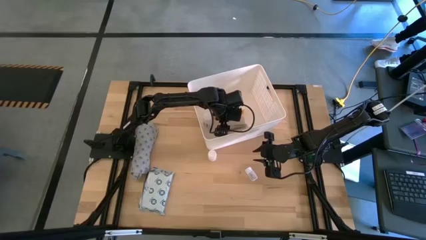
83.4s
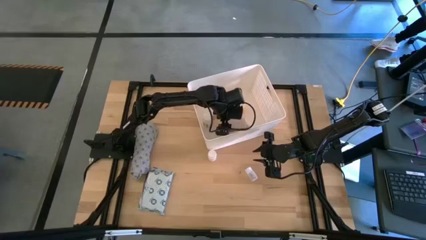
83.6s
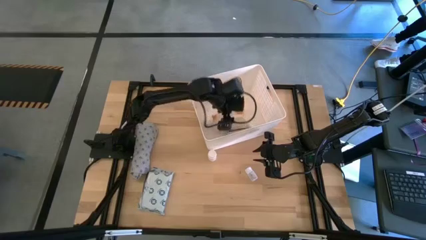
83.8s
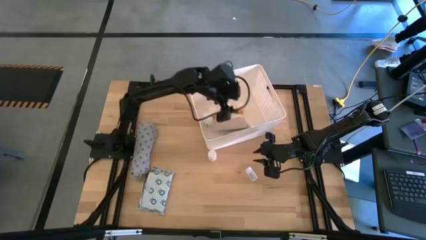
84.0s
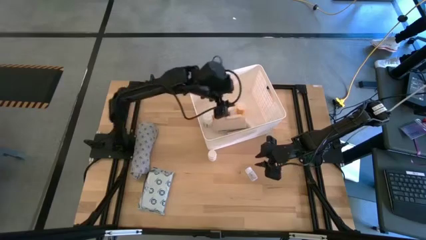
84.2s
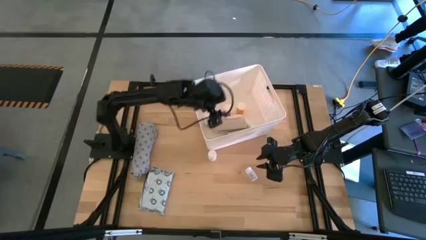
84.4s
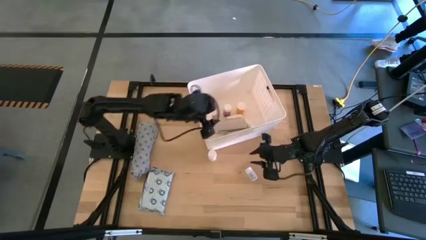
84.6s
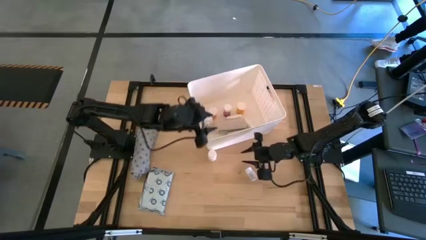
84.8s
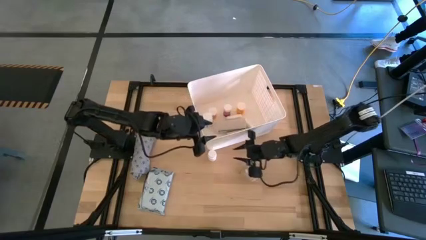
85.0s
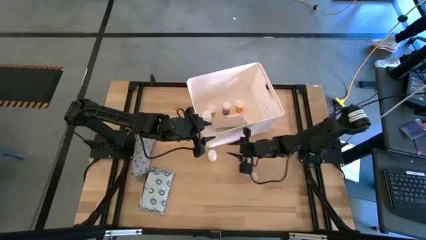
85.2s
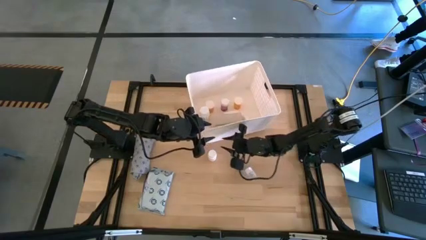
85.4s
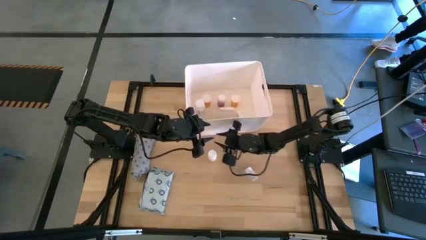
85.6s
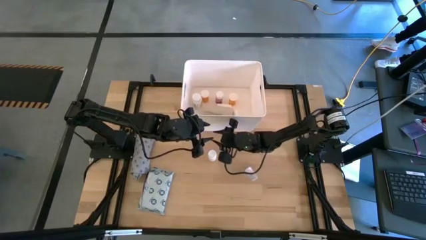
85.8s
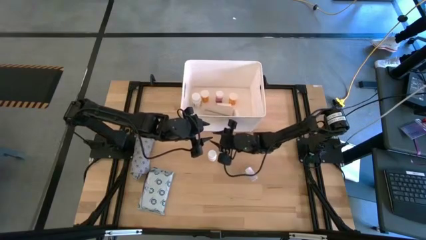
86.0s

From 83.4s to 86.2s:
Task: Pick & place medical supplies in basket/bin
Adjust the white bin on the table

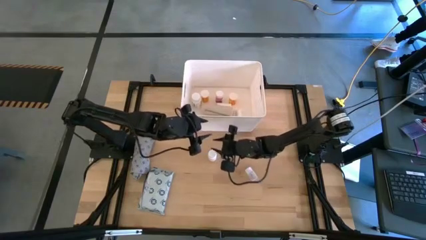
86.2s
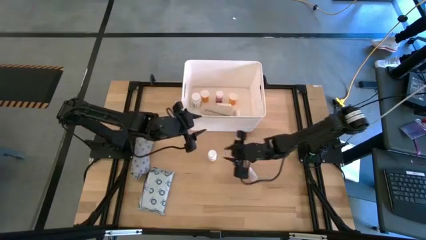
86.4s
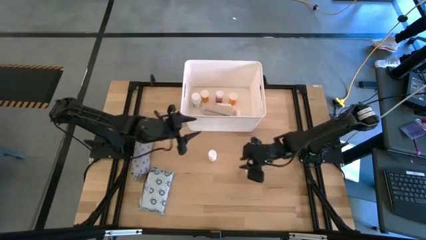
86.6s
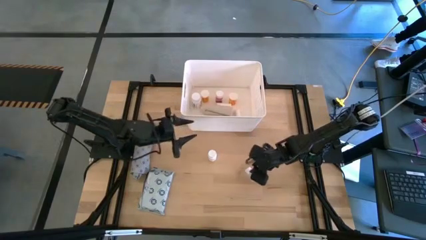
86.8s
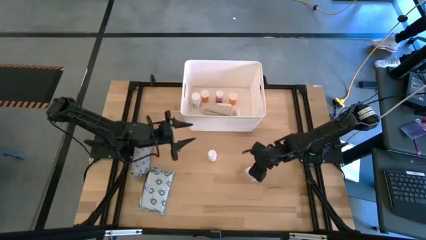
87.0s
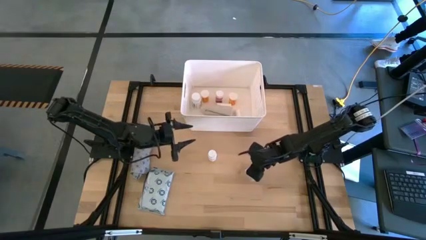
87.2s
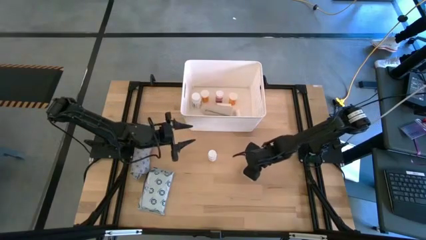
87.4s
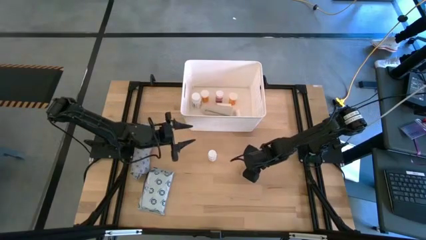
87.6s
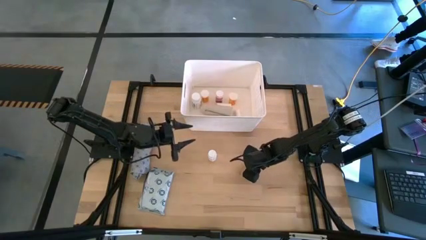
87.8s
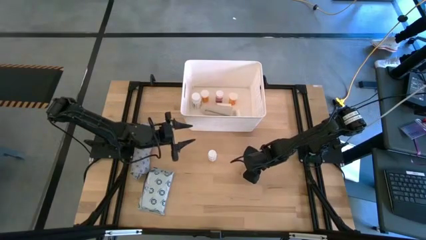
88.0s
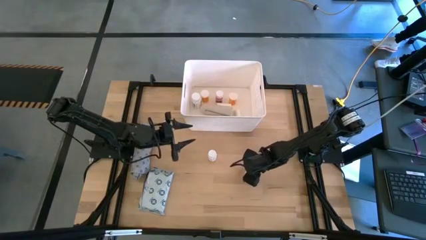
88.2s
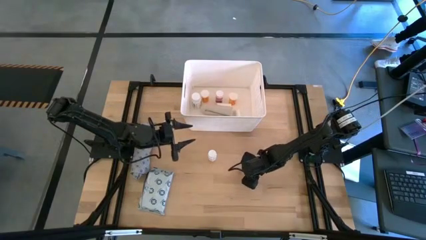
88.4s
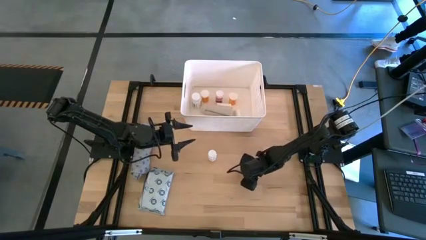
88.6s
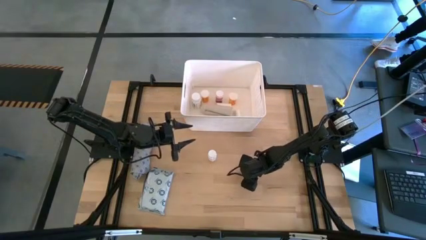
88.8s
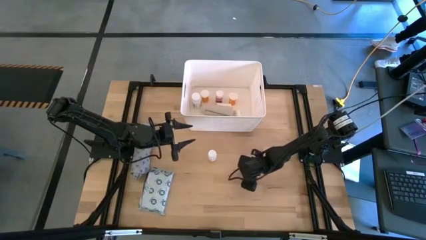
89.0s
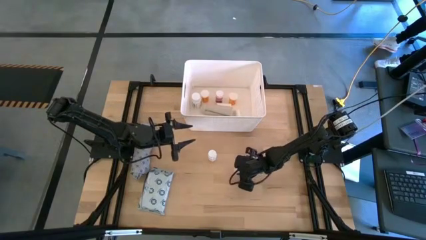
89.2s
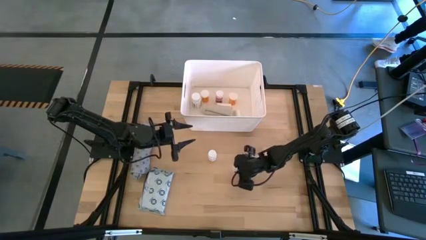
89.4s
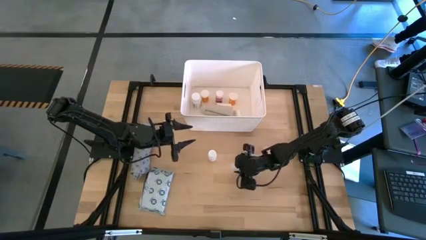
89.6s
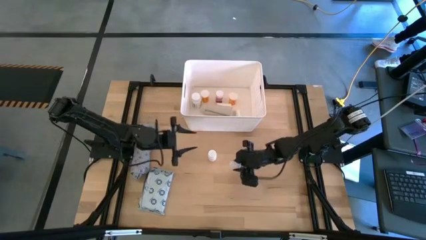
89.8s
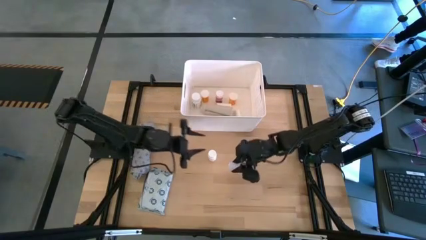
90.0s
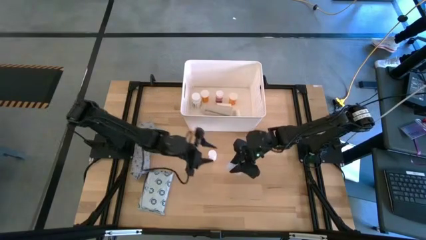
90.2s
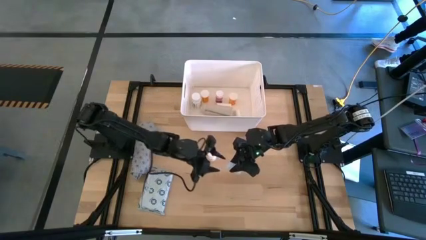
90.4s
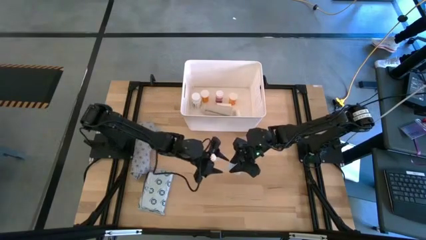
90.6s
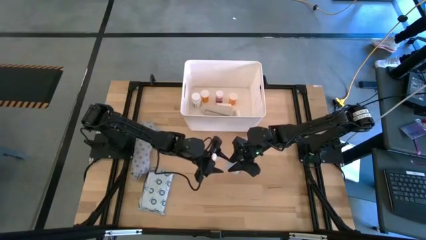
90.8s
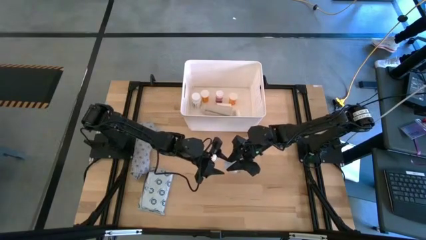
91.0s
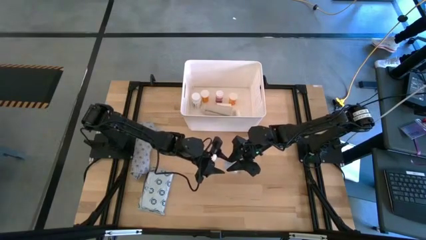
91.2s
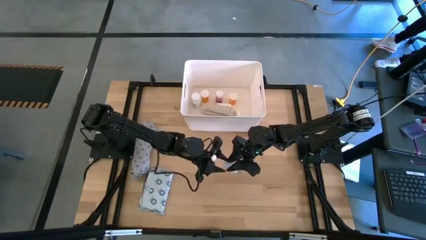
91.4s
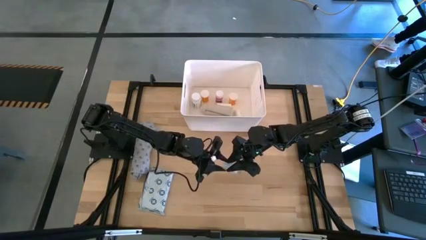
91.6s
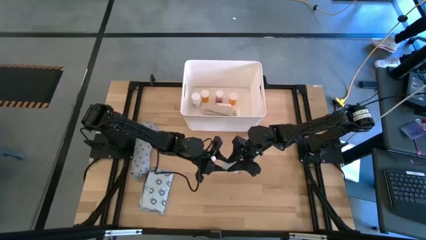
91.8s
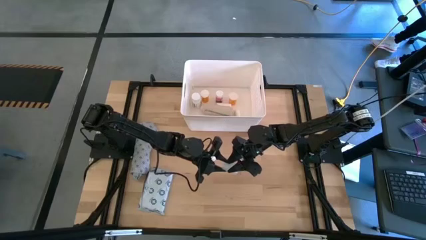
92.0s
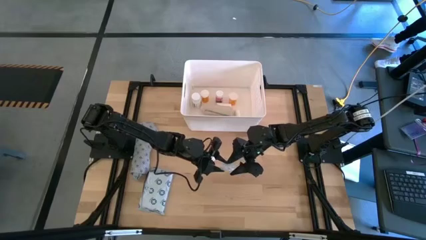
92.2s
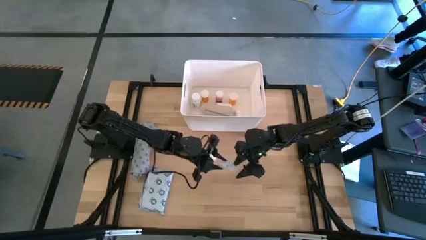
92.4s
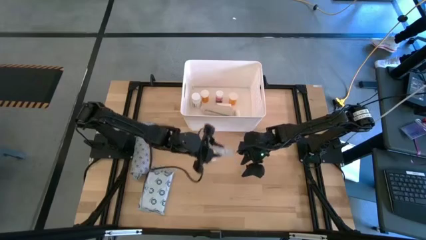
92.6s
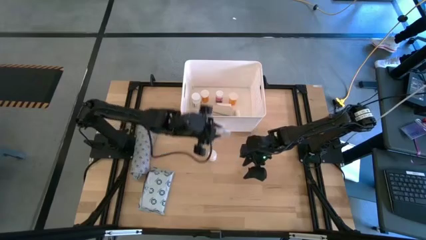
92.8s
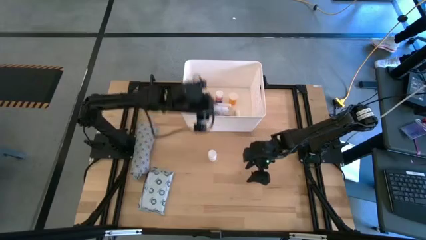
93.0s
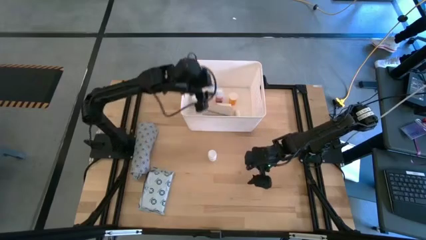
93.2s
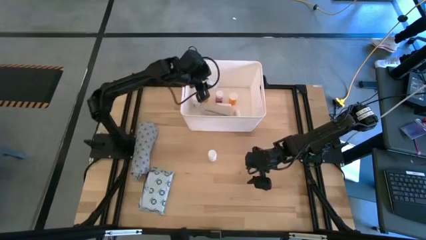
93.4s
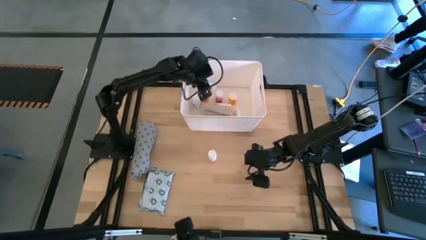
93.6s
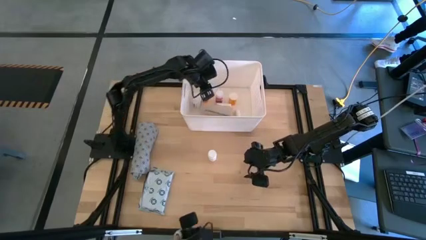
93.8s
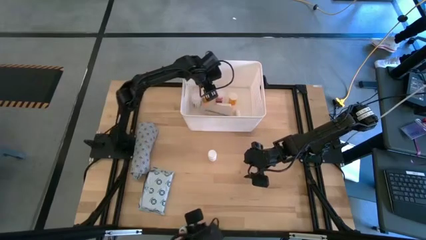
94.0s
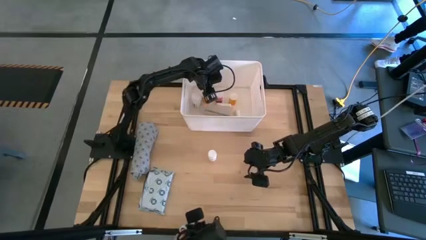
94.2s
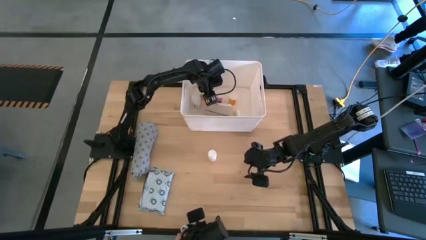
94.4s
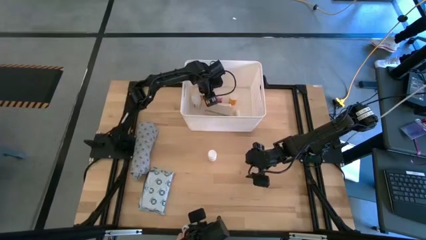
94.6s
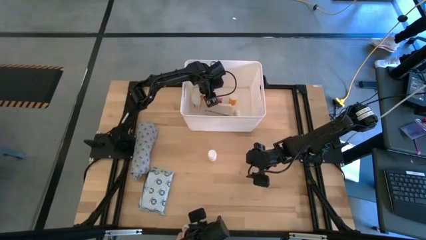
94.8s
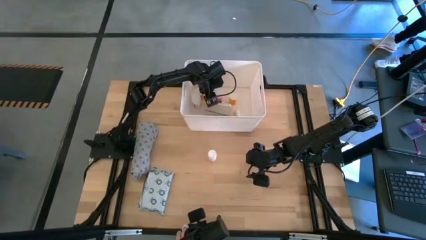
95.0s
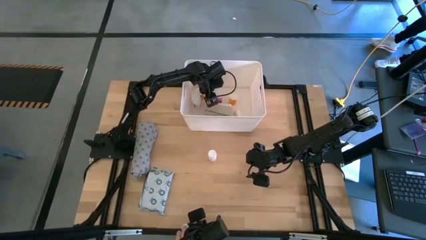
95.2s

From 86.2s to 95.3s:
Put the transparent pill bottle into the white bin

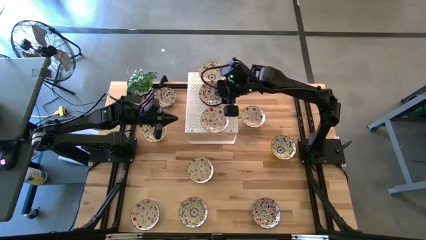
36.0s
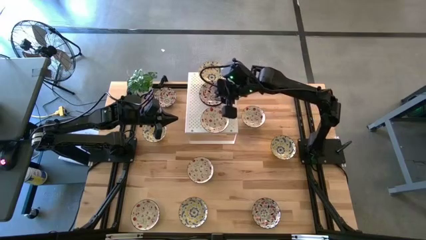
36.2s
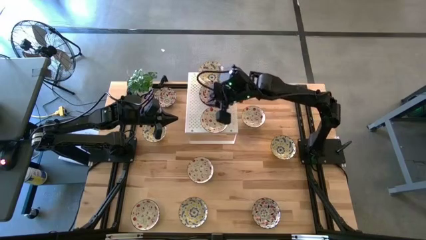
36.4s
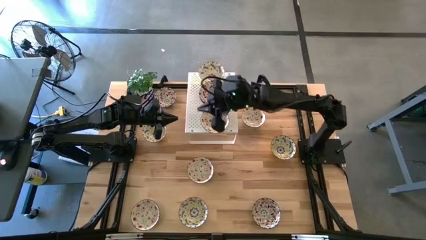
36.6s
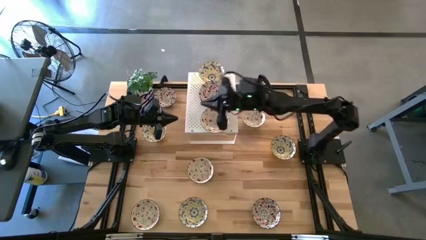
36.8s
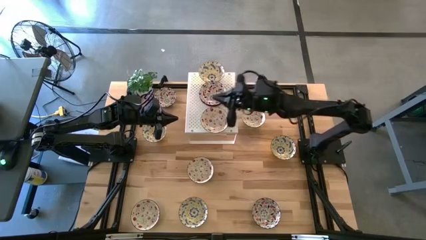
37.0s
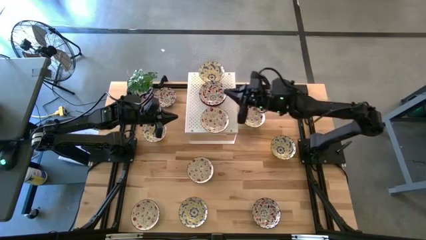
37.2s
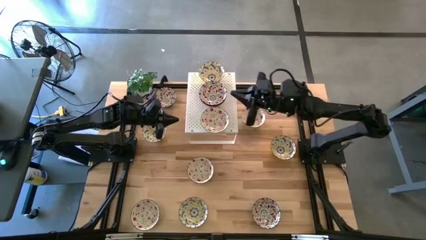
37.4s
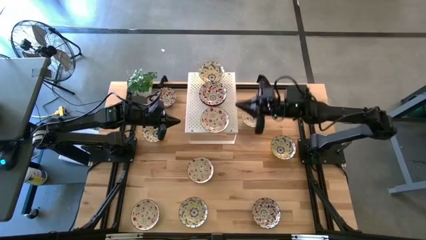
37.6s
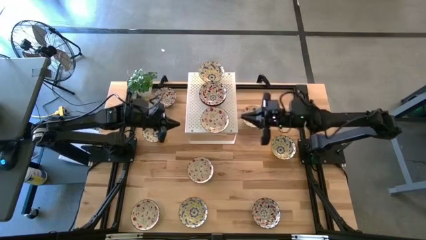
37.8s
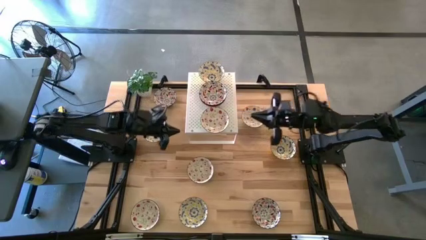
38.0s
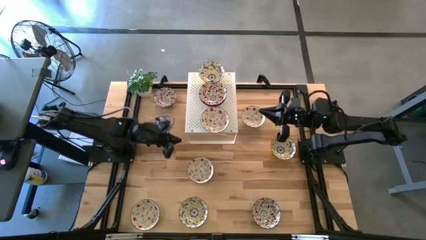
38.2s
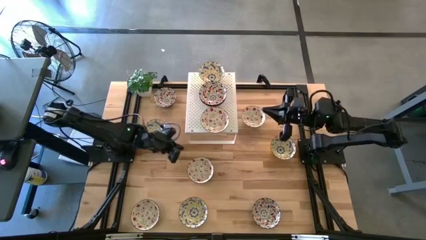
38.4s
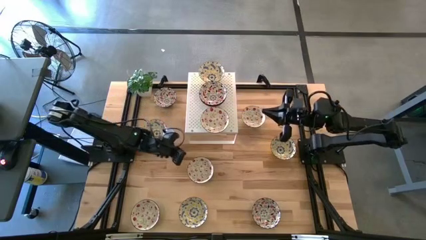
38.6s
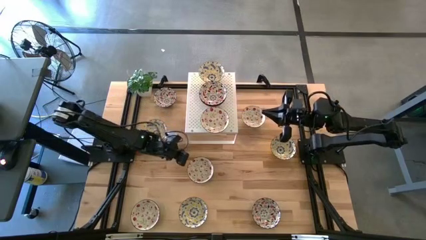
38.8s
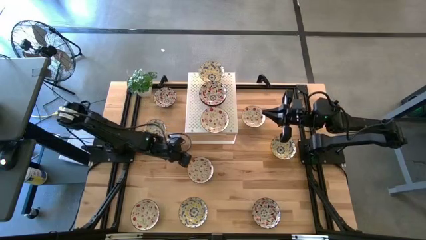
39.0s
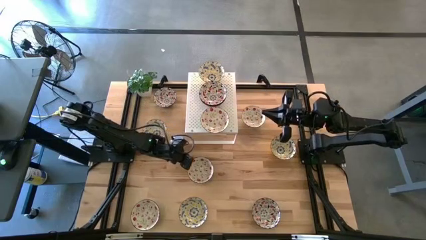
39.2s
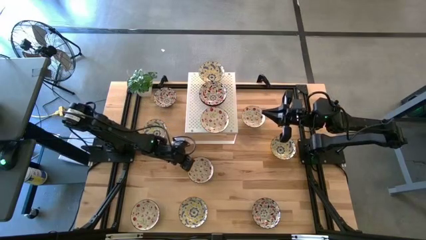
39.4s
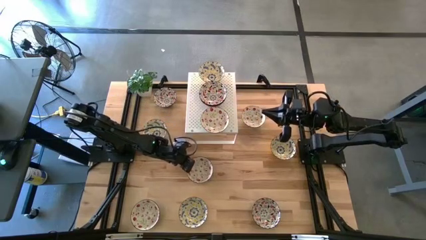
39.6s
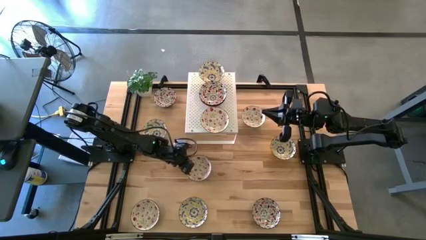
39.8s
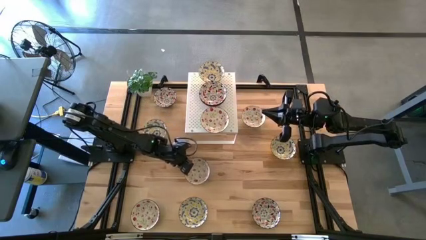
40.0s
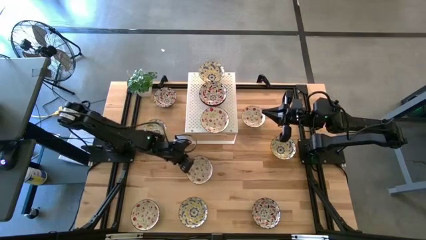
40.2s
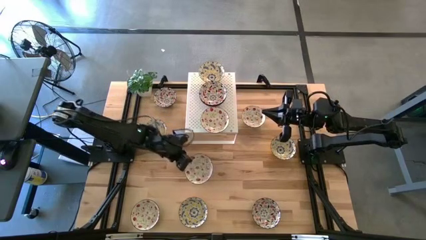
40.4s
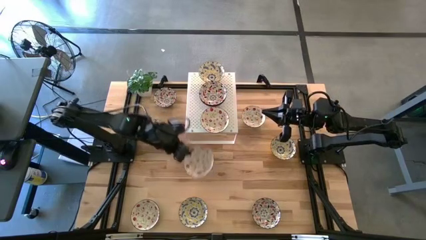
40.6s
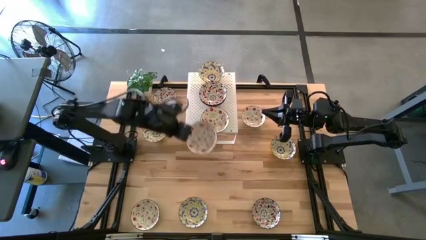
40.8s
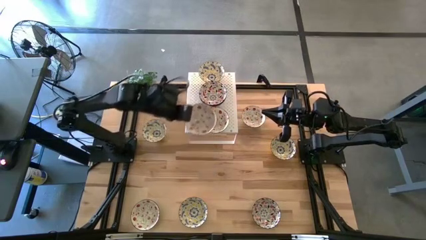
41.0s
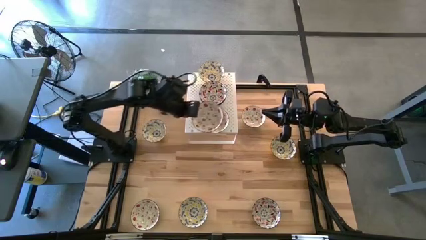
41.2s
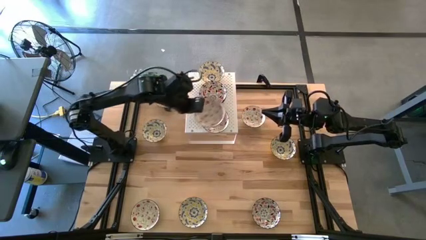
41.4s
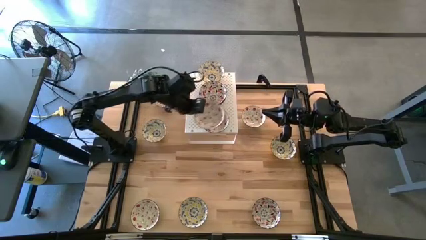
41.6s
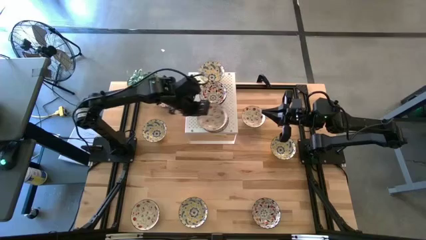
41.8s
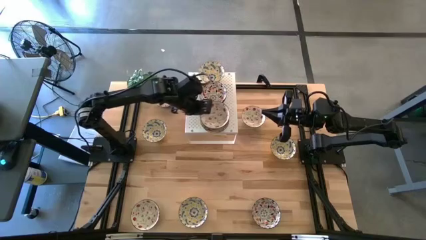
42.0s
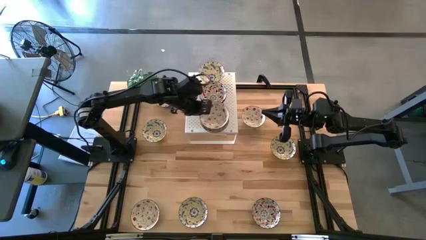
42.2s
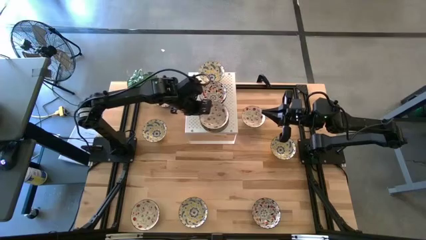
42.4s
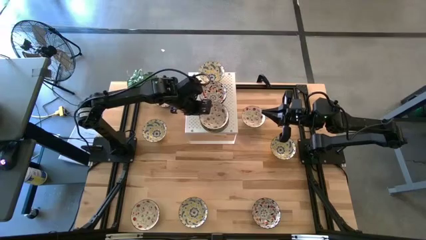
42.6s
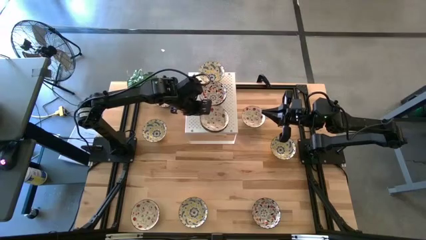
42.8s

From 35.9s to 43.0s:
Task: Pick & Place Mini bowls
Stack the red patterned bowl on top of the red patterned bowl on the shelf
